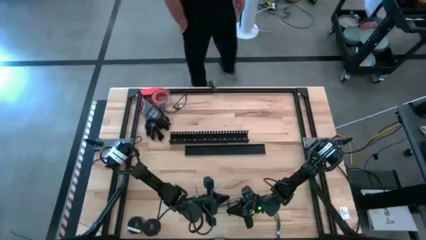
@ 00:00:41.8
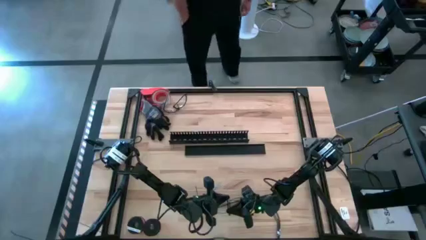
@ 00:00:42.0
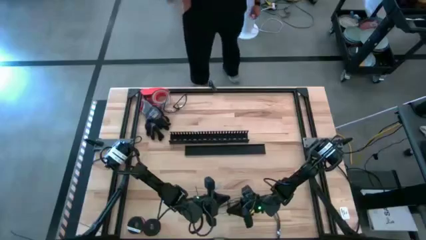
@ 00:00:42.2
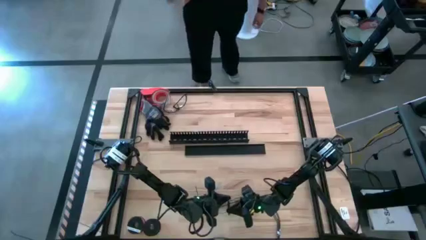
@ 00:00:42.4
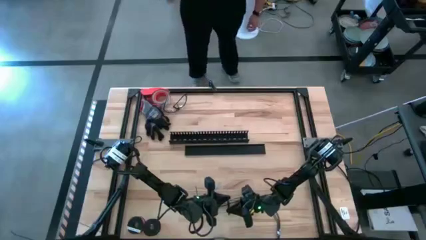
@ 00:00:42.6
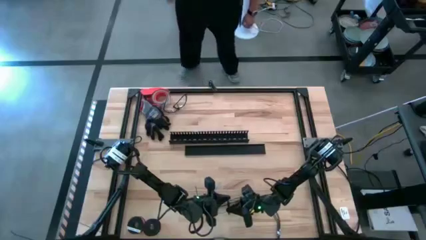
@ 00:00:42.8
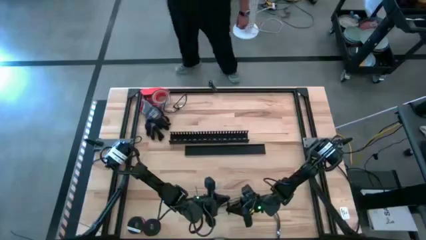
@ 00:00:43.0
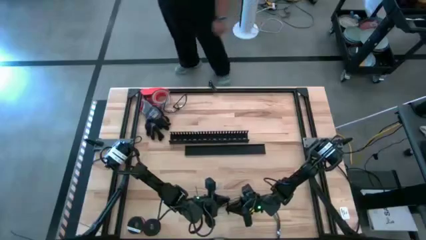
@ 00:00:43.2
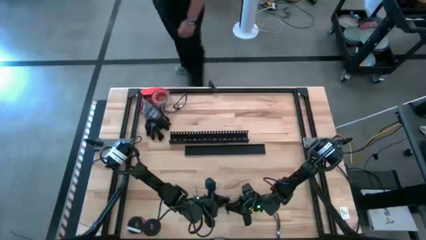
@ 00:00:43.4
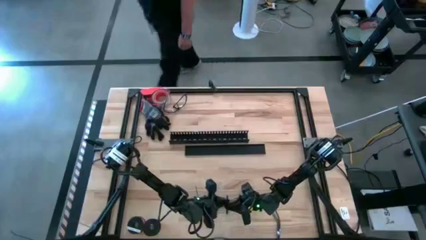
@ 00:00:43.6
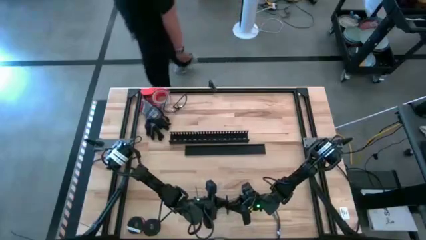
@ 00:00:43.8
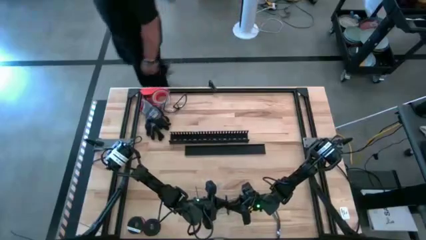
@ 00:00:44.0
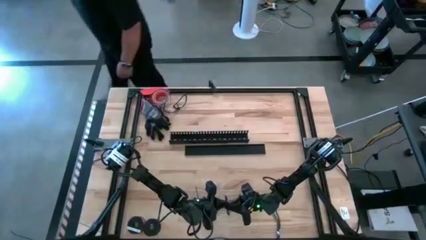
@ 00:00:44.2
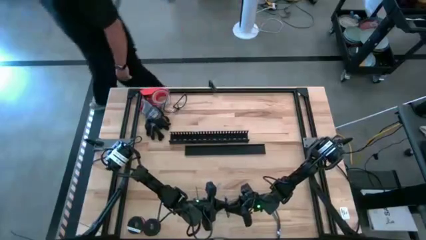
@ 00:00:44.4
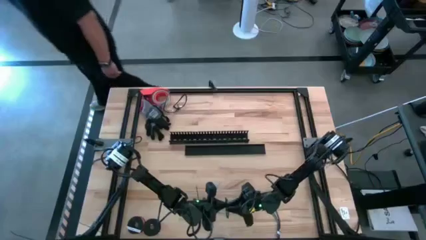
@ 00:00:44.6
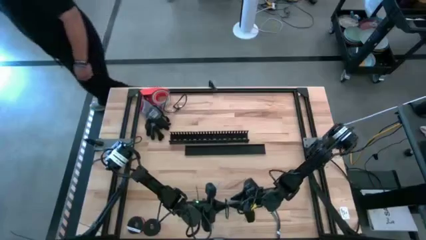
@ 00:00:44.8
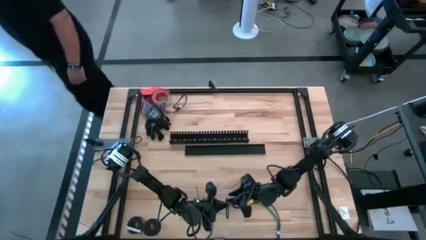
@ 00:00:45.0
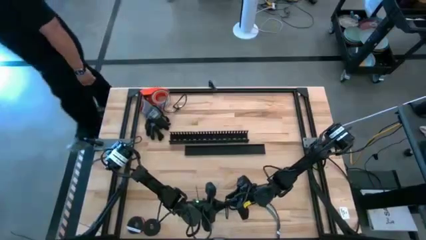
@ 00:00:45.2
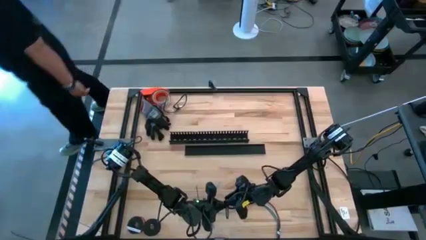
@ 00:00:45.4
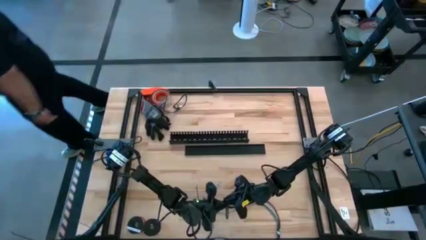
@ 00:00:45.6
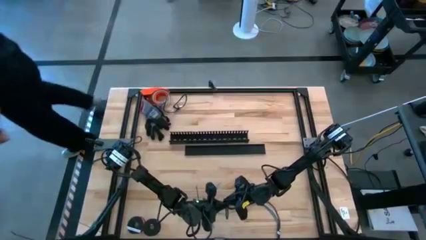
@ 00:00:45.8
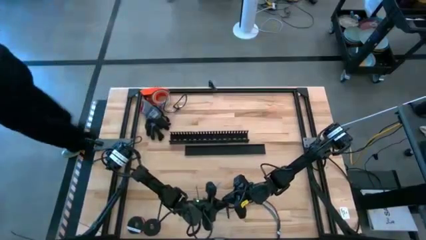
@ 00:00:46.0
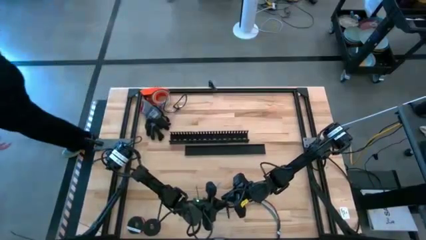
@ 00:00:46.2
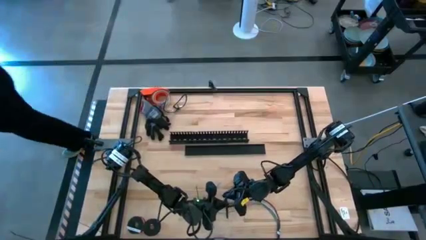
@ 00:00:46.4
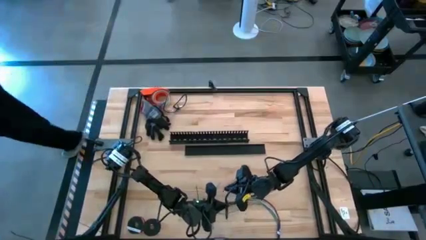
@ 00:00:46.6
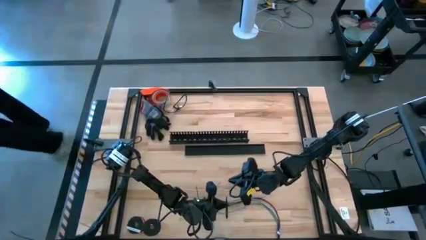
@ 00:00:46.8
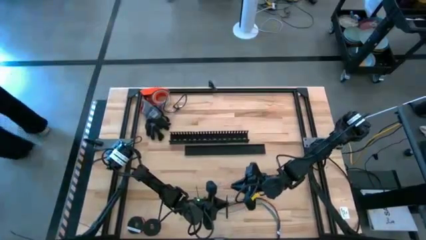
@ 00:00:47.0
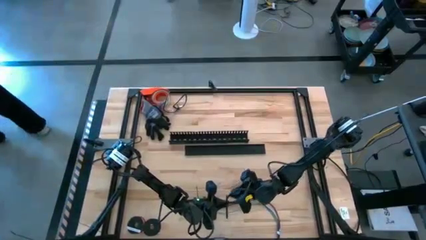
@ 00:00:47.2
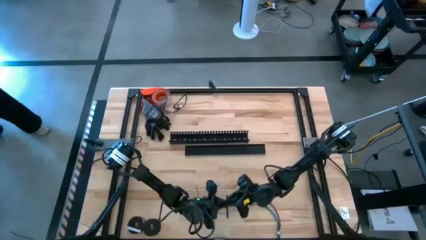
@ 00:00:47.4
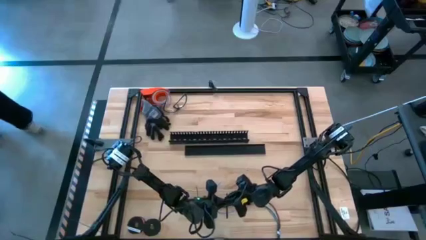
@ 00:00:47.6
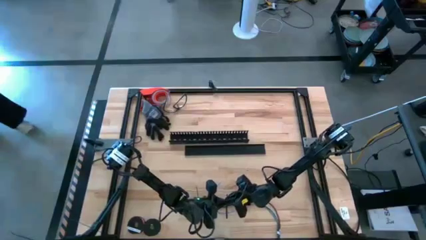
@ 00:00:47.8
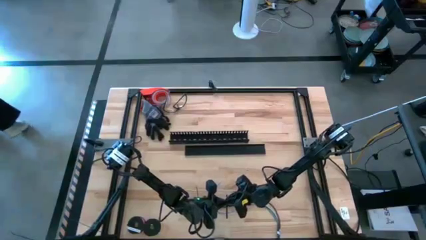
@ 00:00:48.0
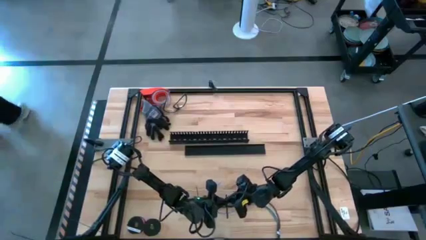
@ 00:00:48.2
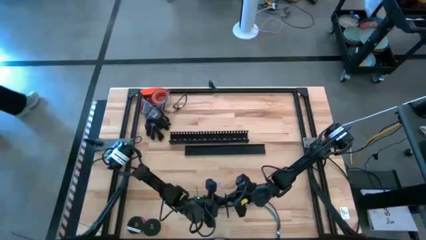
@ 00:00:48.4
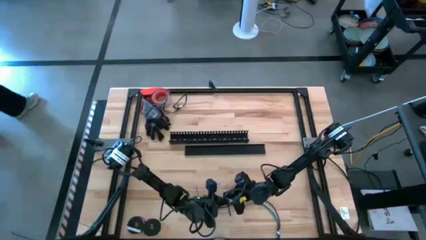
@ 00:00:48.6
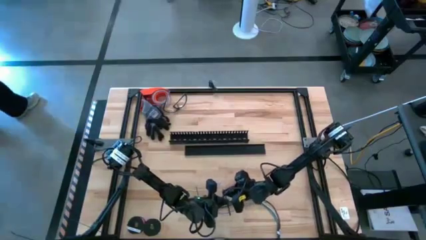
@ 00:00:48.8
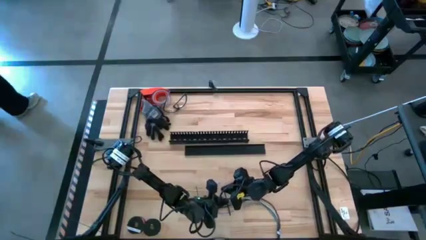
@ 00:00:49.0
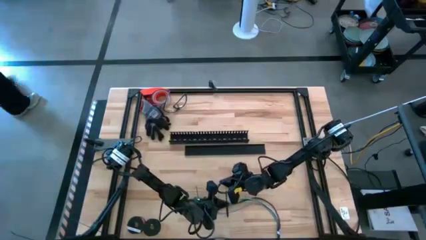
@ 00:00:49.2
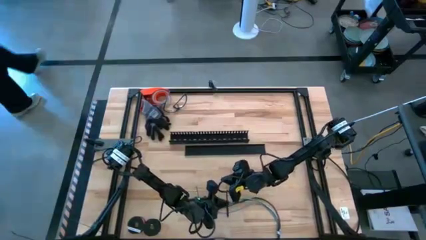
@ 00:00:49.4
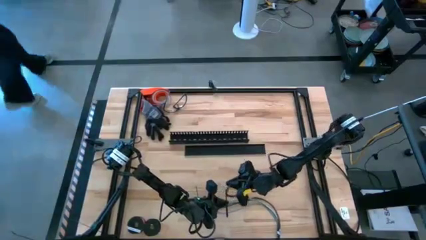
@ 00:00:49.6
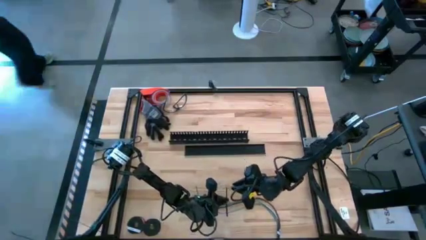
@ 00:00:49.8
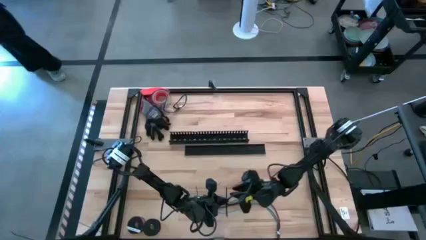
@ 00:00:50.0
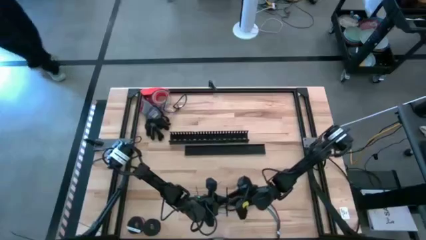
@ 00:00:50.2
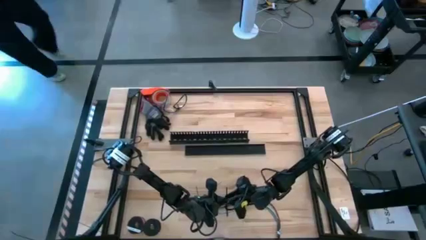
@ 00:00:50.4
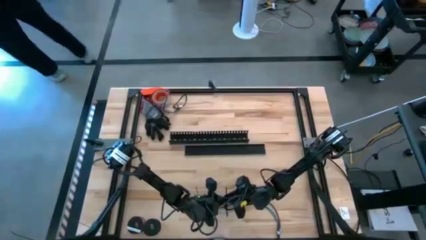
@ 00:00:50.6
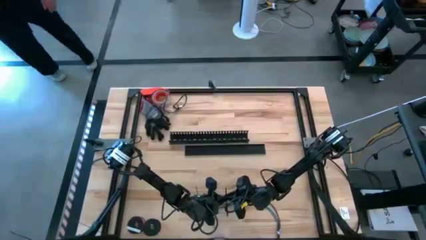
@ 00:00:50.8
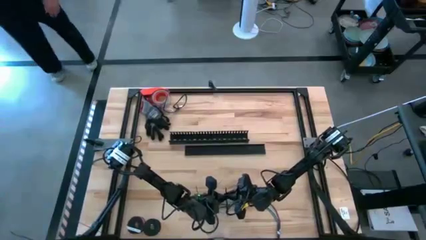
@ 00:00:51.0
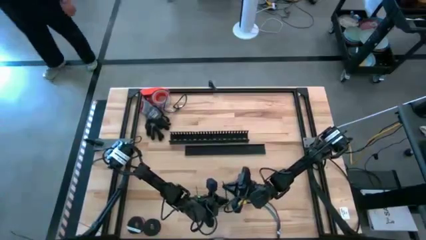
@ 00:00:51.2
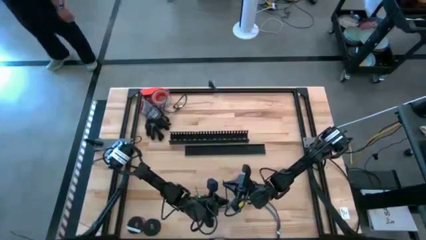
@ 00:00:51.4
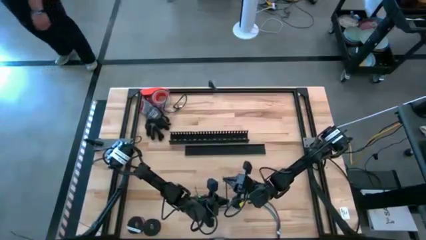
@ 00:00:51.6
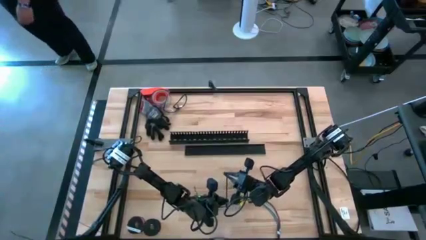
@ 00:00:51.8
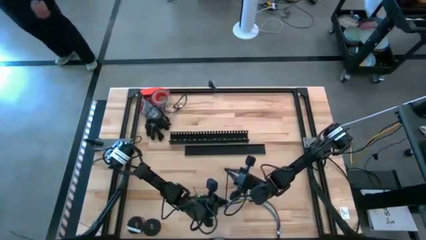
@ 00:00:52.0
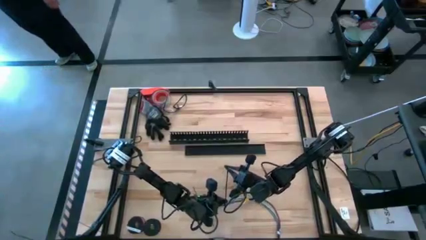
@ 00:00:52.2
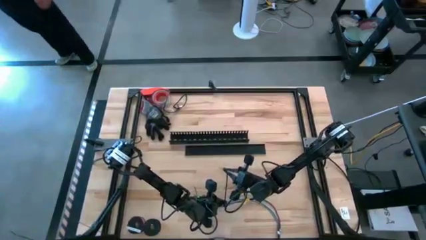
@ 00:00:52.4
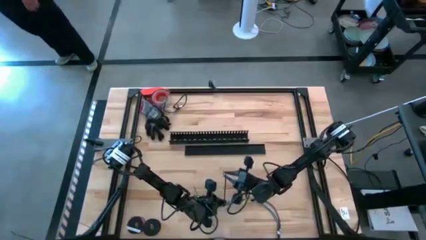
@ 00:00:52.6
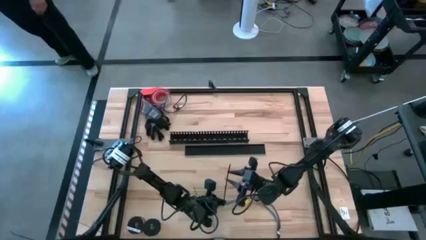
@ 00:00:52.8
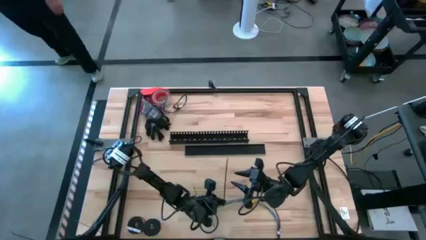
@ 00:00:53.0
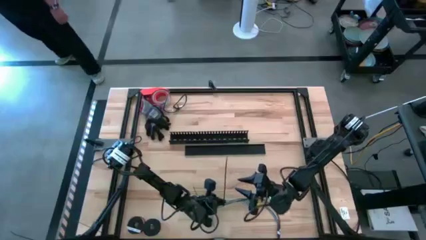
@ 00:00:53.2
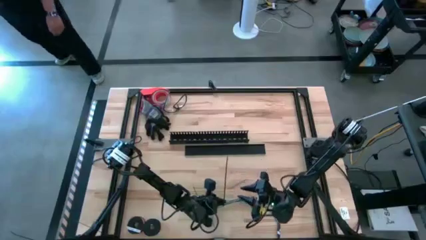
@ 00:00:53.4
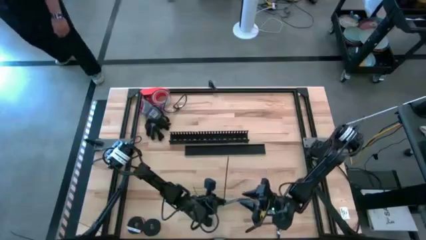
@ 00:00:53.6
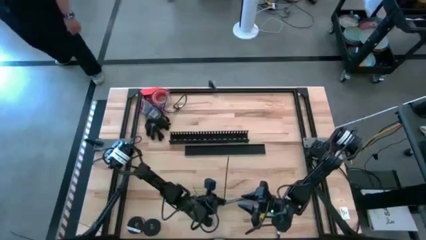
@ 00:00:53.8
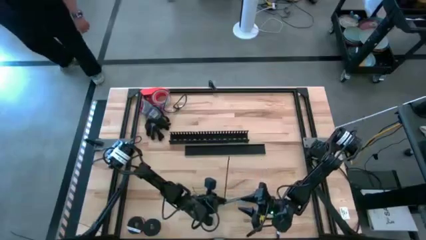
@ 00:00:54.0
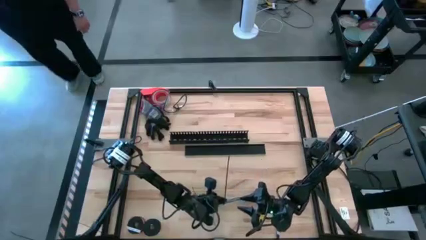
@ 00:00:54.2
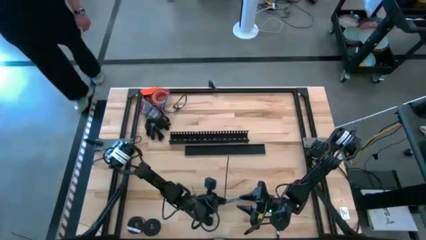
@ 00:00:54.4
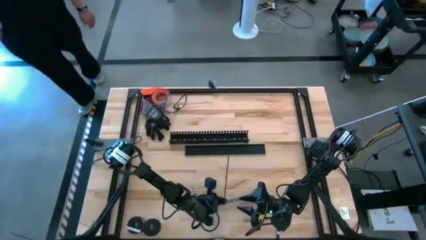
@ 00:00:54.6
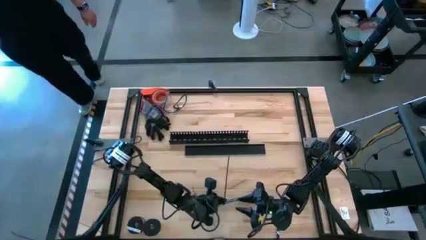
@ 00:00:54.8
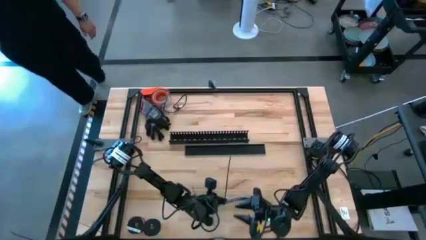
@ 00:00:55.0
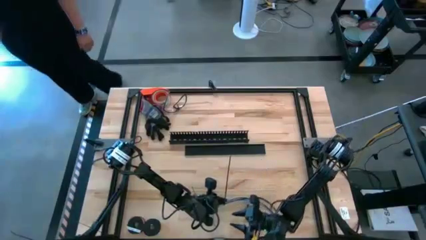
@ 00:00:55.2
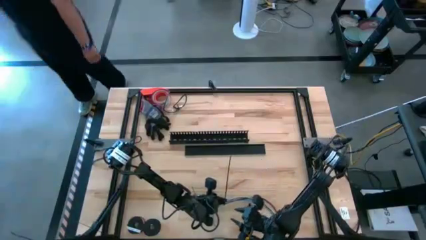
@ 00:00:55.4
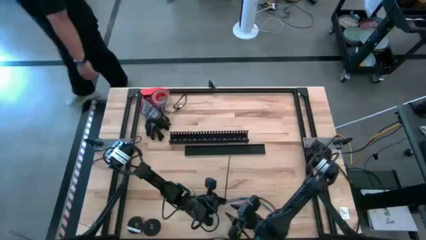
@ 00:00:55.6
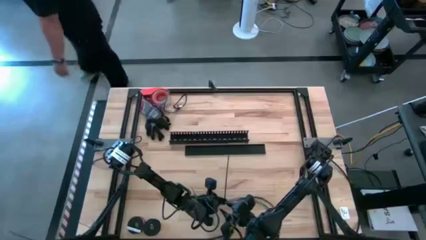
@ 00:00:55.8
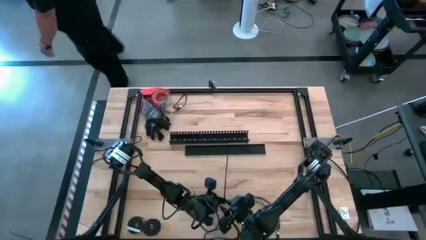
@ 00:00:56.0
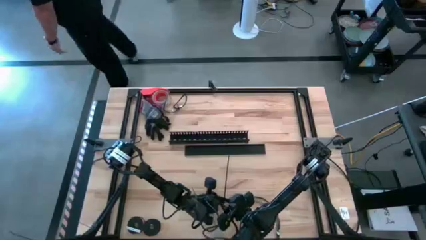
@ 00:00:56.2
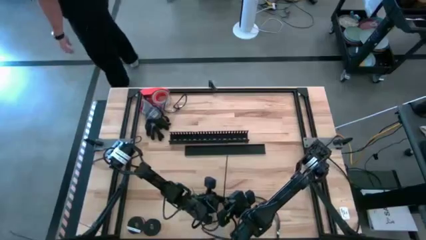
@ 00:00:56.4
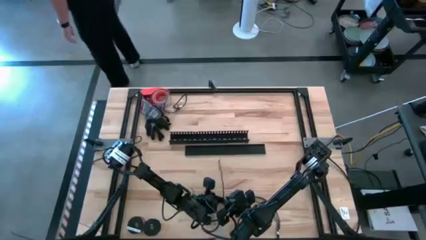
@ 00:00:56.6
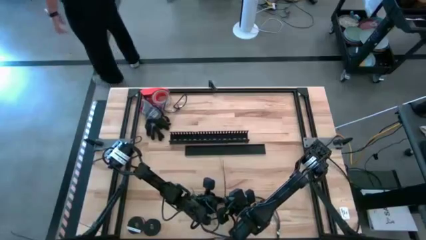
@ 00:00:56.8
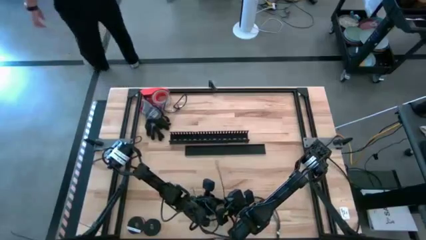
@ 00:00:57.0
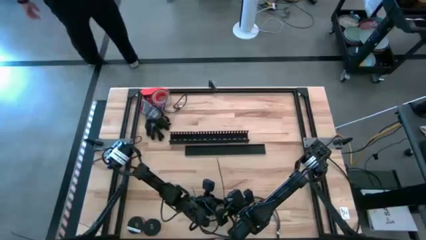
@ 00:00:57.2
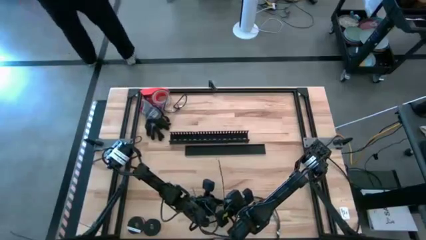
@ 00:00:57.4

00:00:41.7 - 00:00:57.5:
Task: Ziptie cables
Wrap the cable wires with the black zip tie
